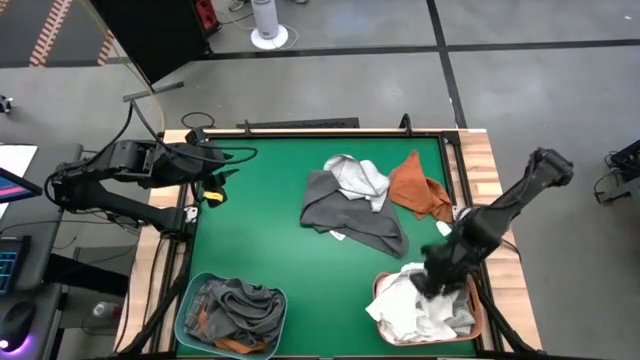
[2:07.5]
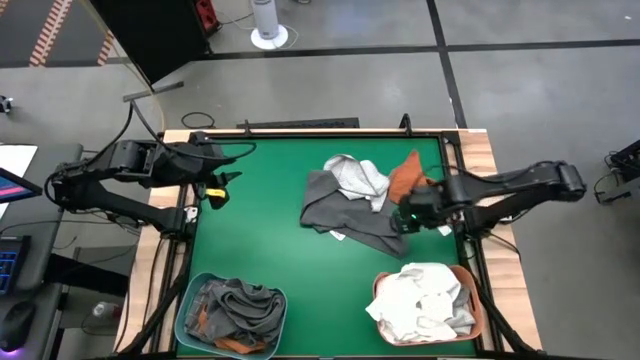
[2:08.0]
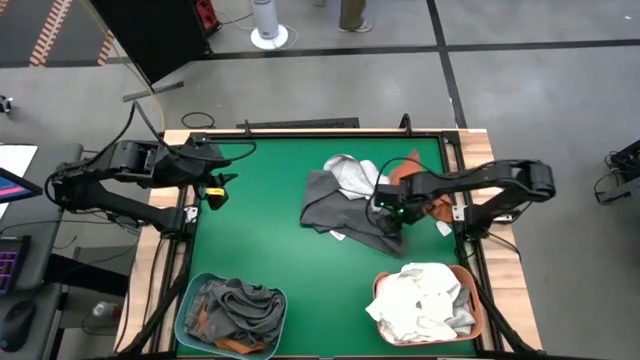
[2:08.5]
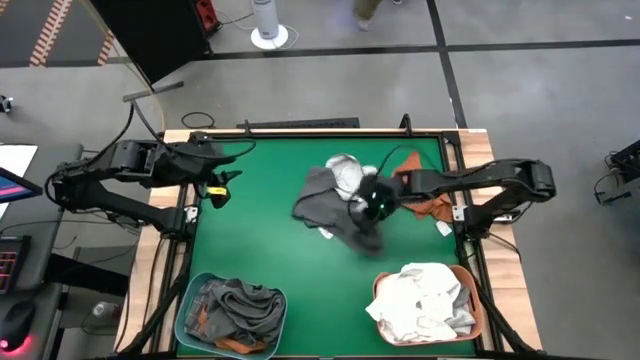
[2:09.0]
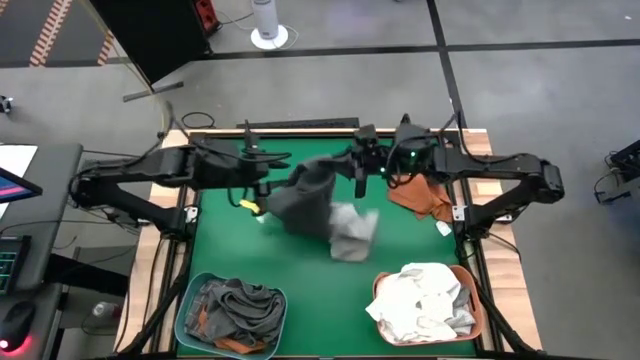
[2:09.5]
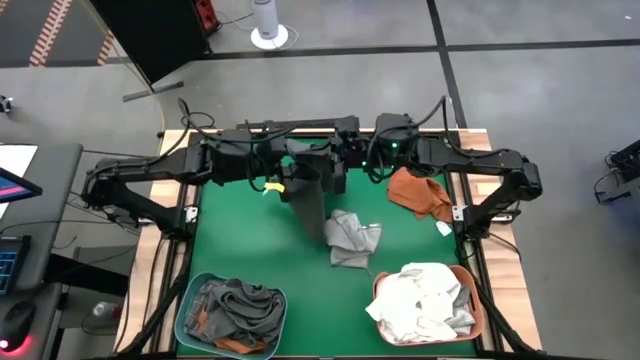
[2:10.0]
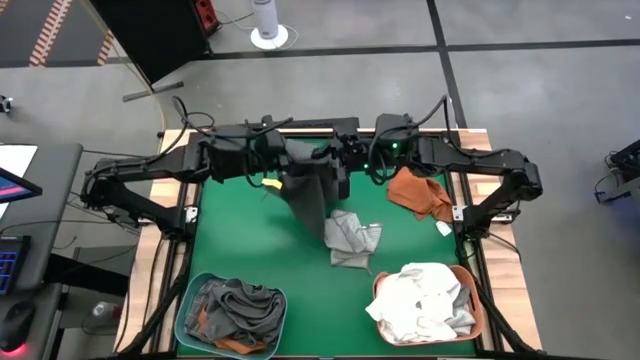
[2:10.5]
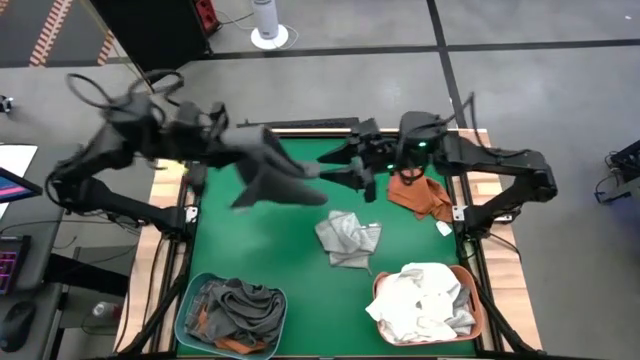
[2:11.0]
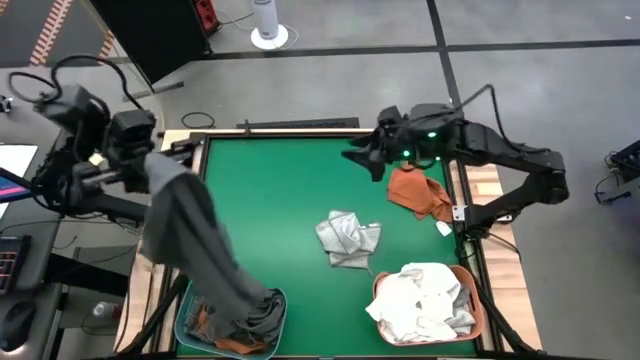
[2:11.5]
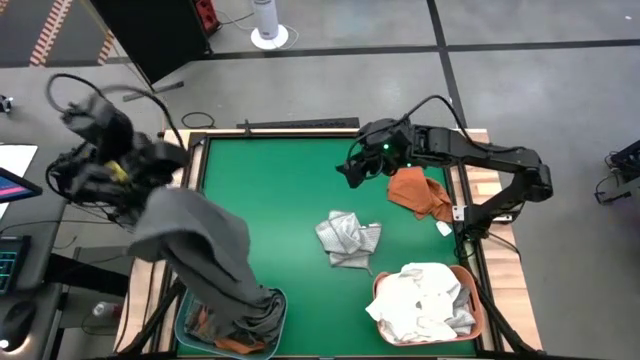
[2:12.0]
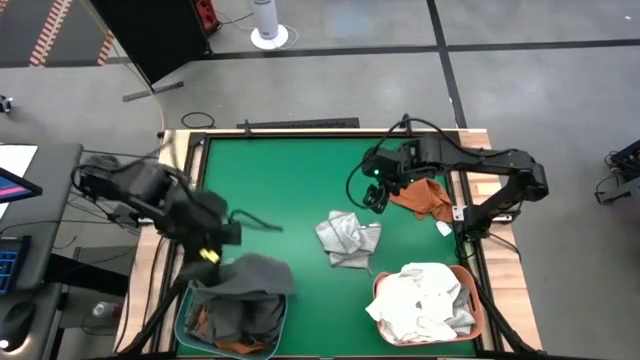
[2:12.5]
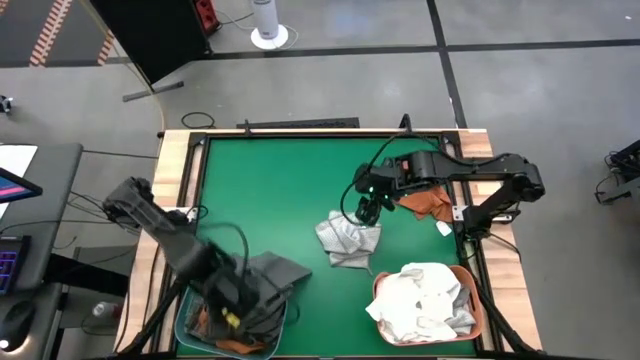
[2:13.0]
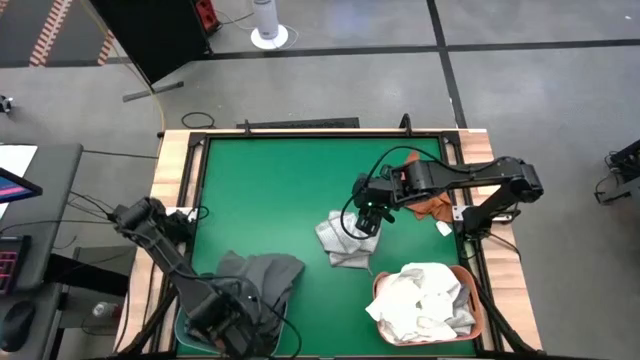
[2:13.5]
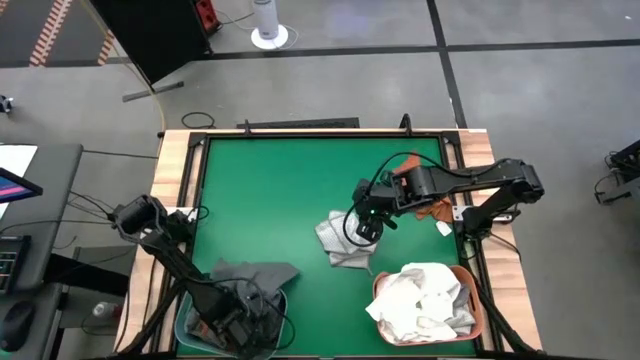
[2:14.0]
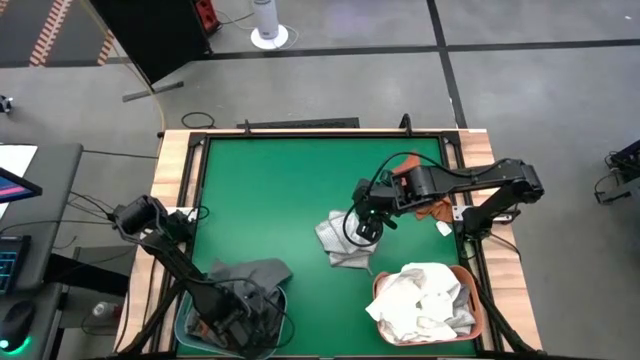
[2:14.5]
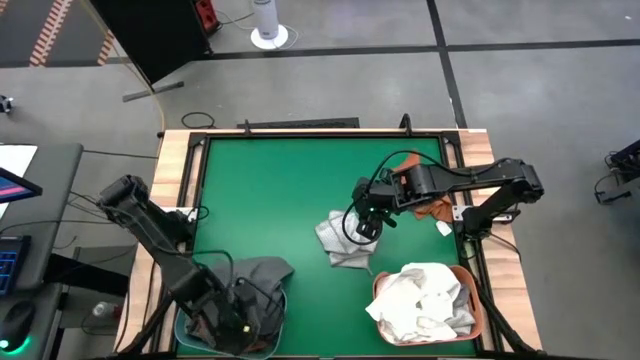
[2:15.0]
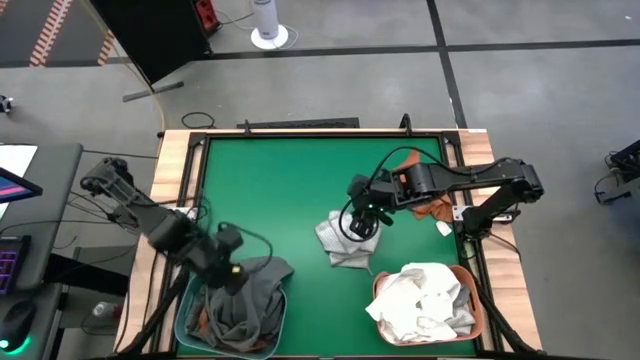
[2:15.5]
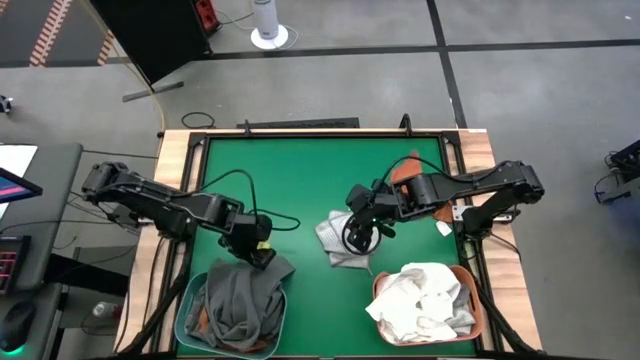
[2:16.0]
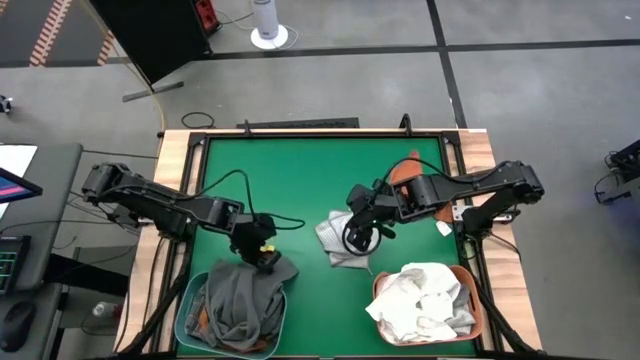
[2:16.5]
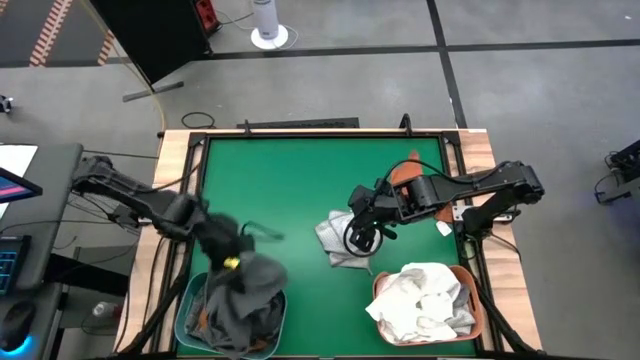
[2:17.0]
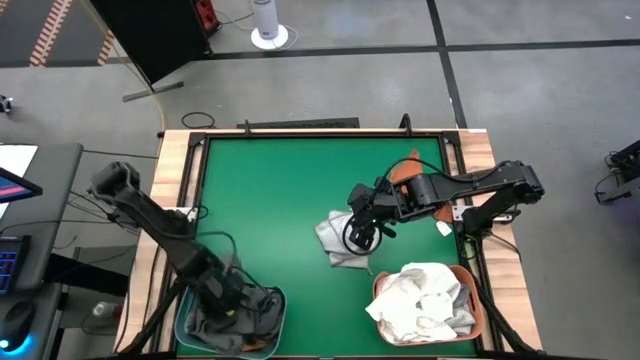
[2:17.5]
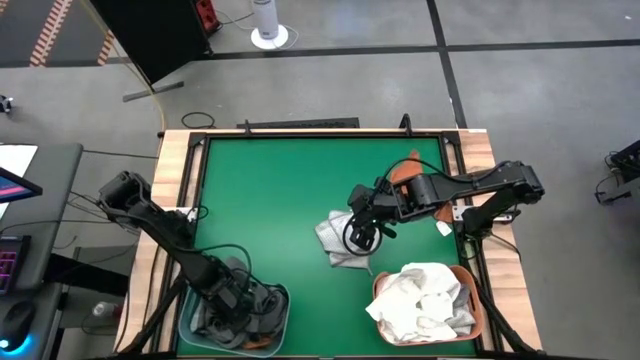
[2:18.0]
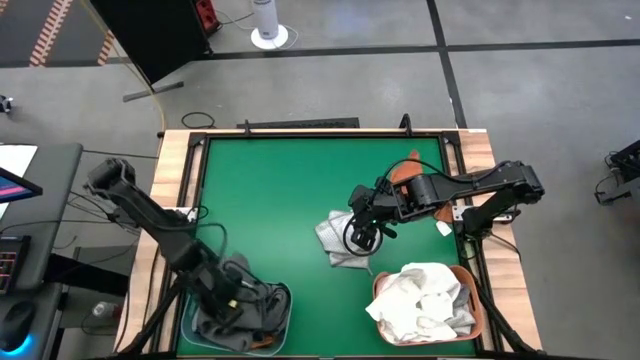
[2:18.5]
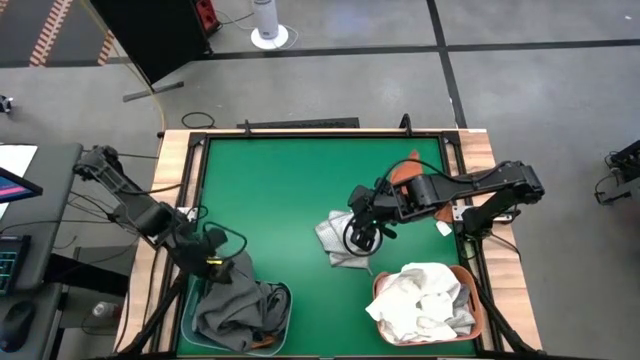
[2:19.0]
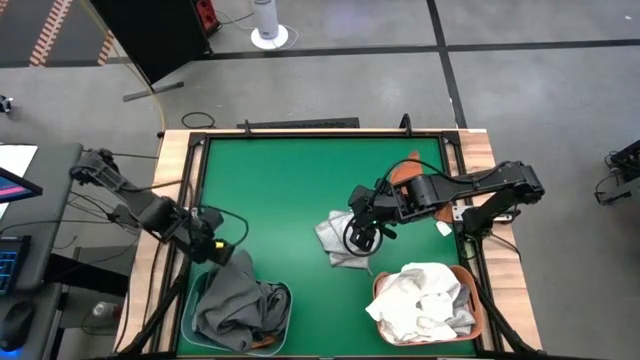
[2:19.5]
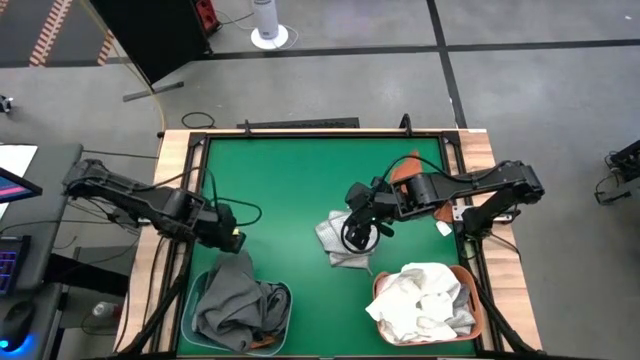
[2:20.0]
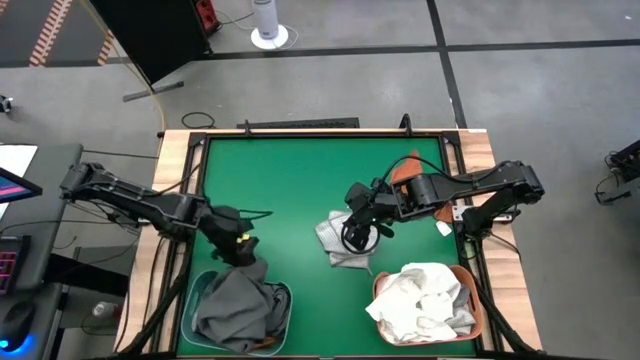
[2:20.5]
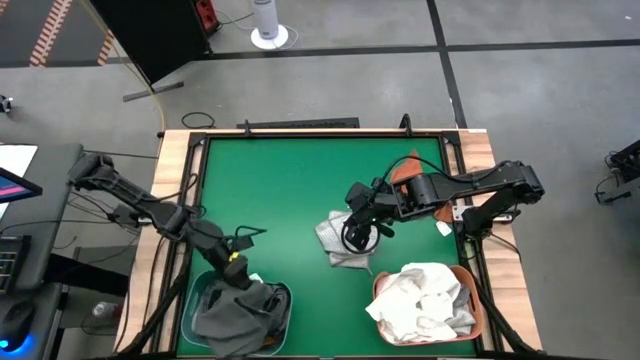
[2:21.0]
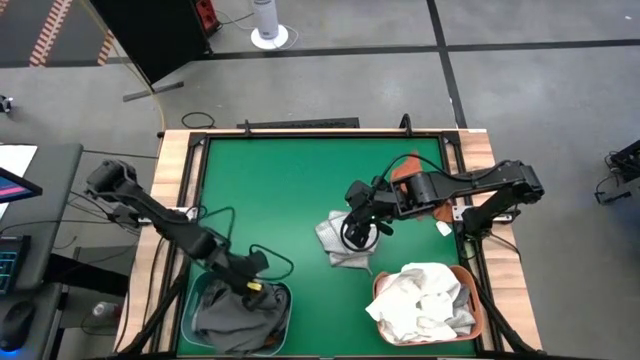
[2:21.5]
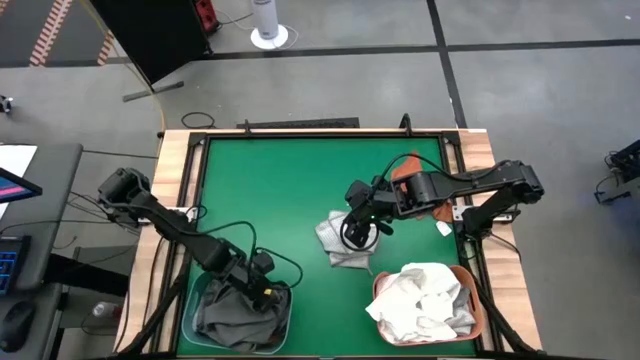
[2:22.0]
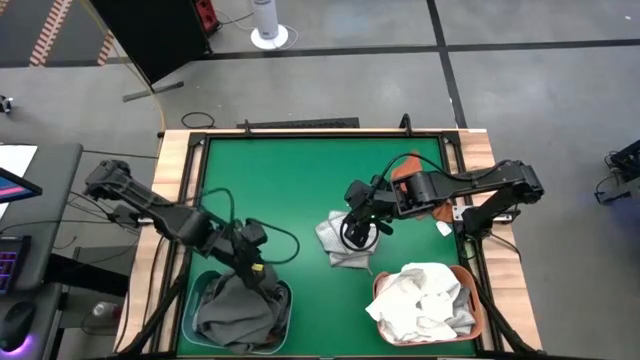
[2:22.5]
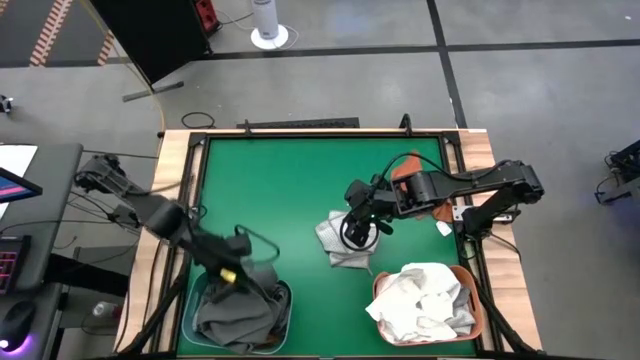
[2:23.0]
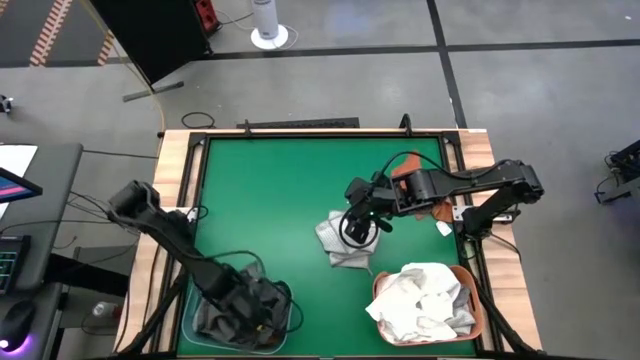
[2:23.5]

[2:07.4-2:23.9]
Task: Sort towels by color in basket
Put the gray towel into the green bin
